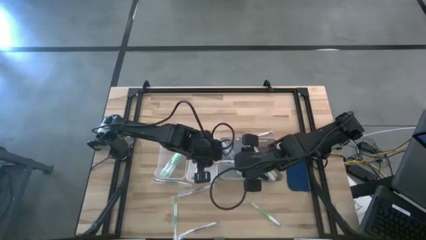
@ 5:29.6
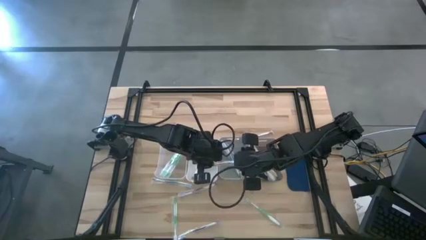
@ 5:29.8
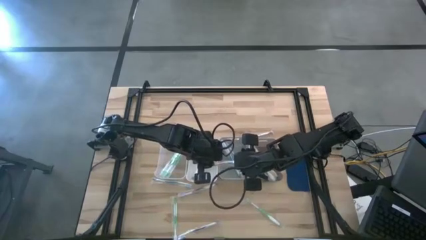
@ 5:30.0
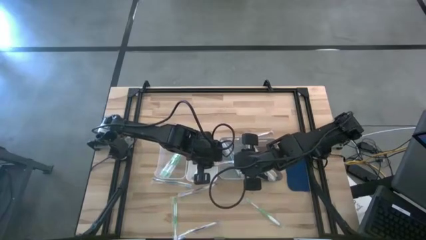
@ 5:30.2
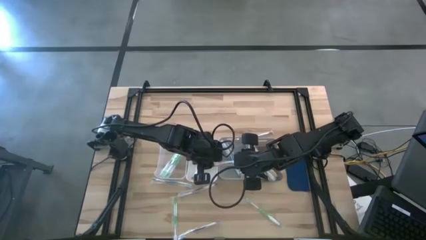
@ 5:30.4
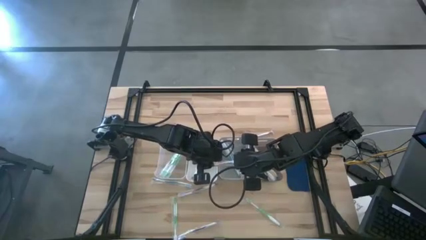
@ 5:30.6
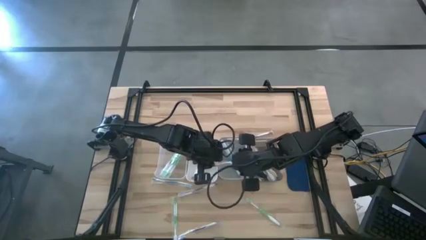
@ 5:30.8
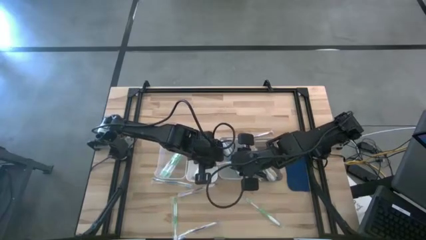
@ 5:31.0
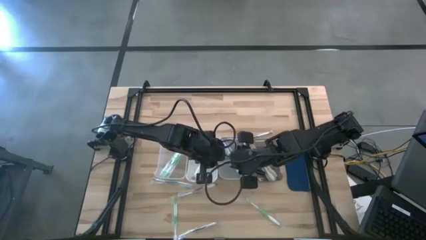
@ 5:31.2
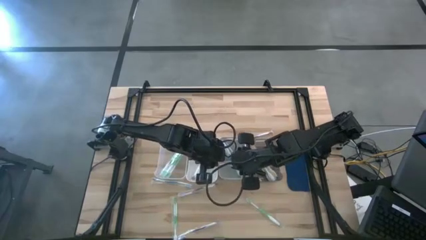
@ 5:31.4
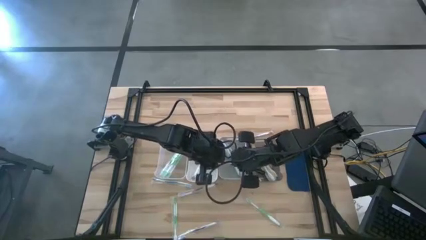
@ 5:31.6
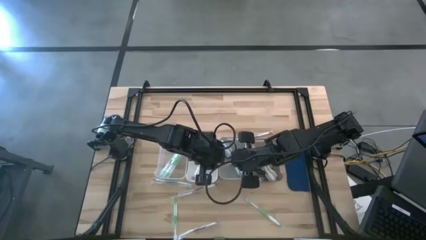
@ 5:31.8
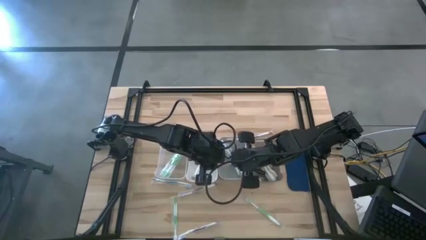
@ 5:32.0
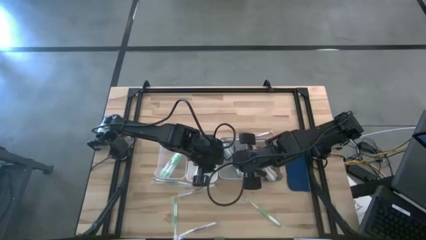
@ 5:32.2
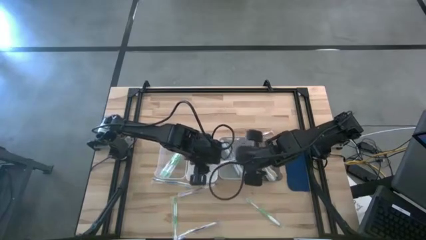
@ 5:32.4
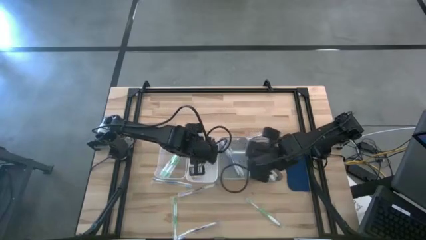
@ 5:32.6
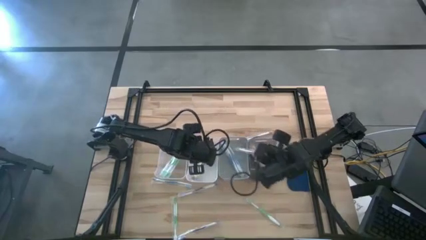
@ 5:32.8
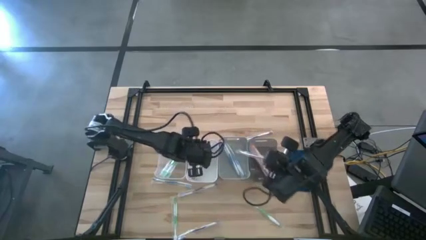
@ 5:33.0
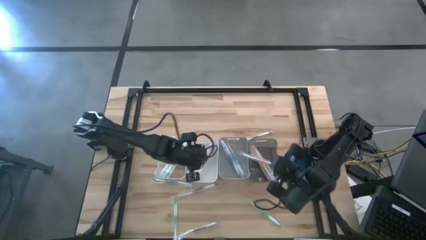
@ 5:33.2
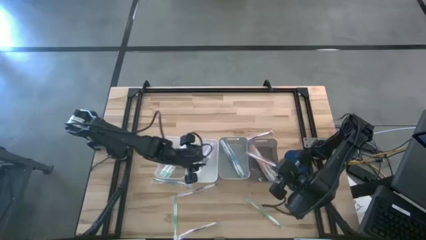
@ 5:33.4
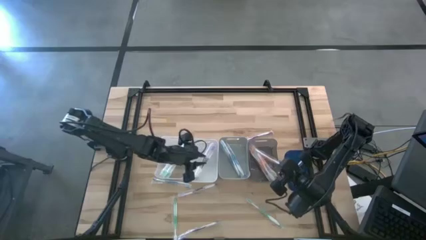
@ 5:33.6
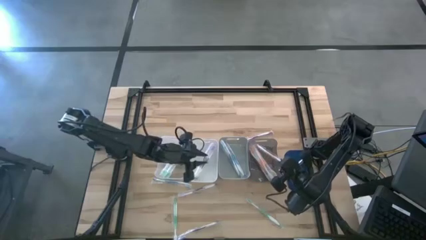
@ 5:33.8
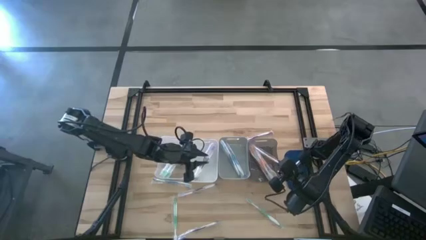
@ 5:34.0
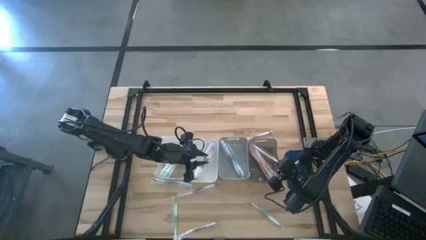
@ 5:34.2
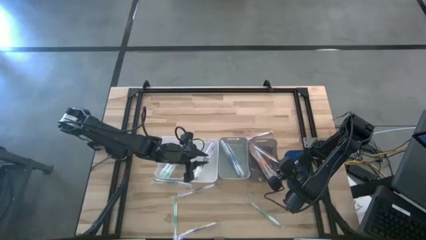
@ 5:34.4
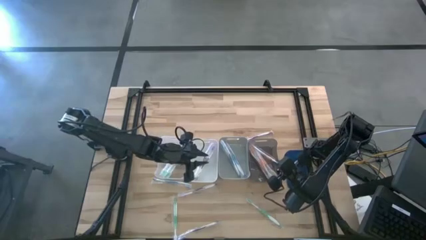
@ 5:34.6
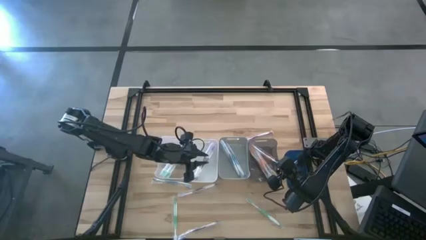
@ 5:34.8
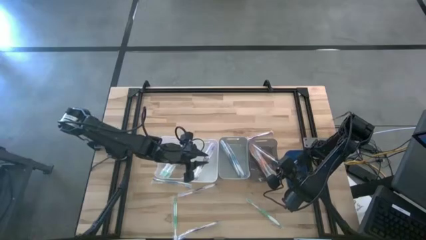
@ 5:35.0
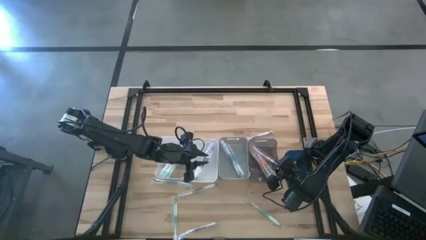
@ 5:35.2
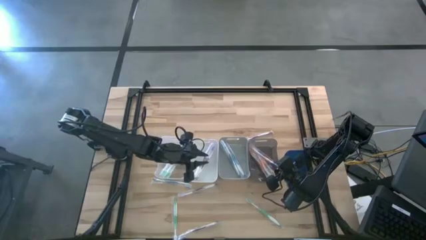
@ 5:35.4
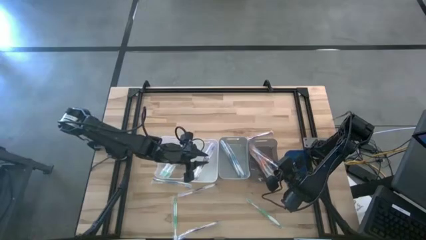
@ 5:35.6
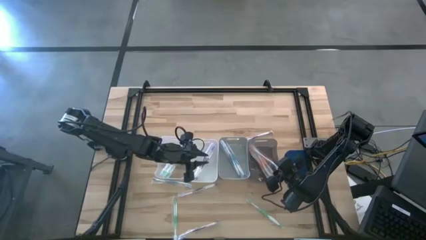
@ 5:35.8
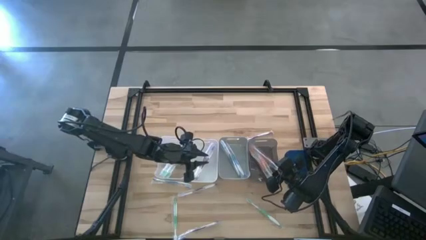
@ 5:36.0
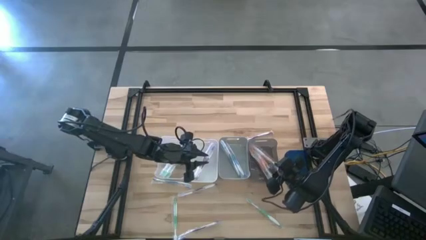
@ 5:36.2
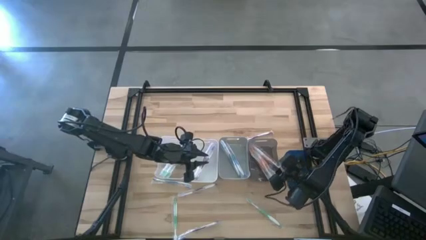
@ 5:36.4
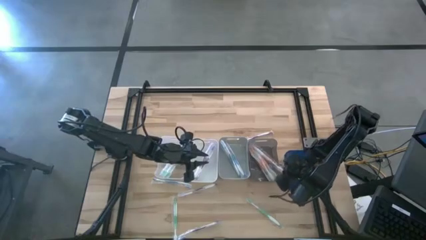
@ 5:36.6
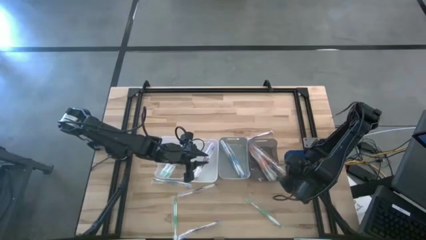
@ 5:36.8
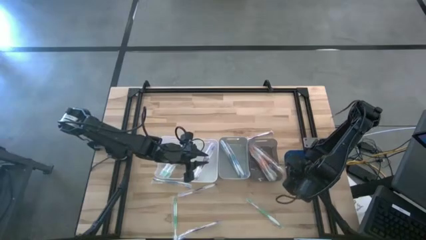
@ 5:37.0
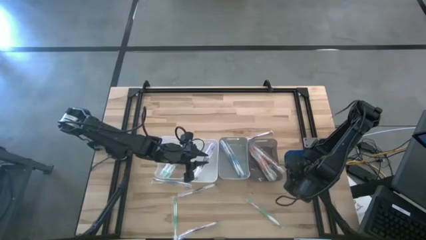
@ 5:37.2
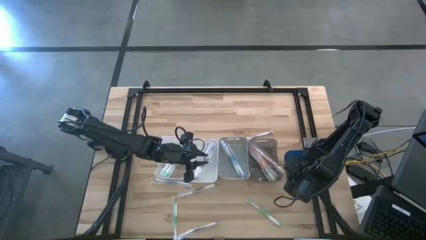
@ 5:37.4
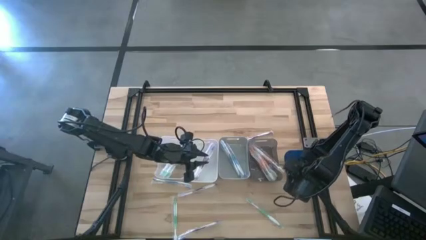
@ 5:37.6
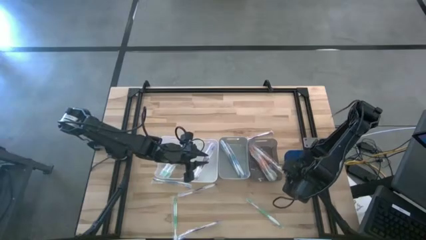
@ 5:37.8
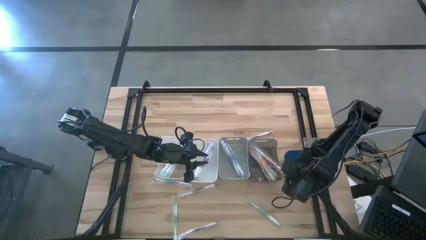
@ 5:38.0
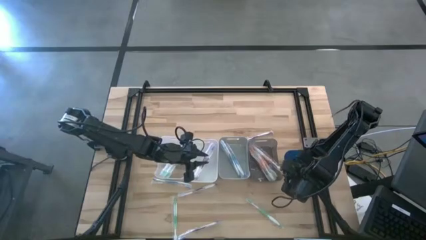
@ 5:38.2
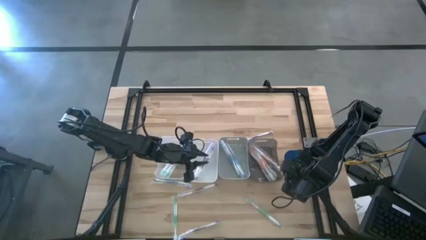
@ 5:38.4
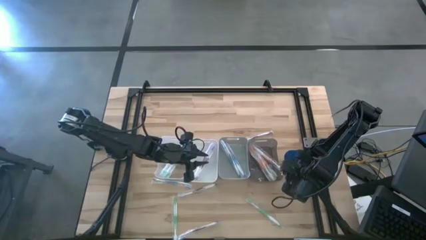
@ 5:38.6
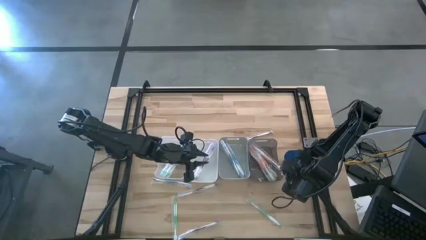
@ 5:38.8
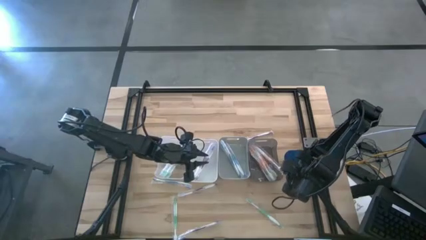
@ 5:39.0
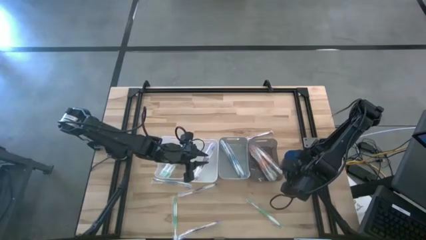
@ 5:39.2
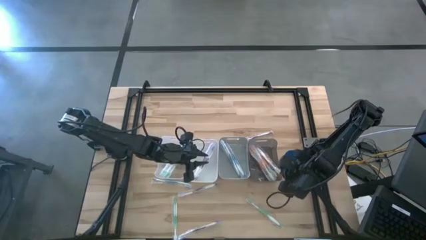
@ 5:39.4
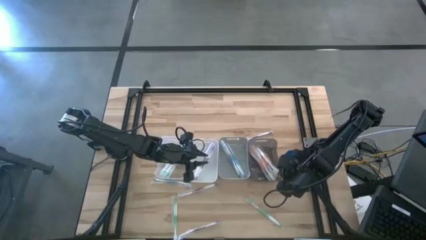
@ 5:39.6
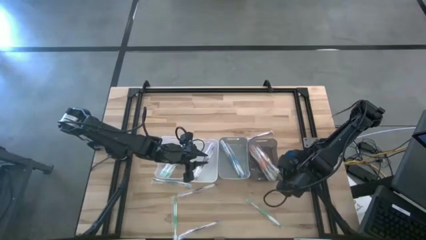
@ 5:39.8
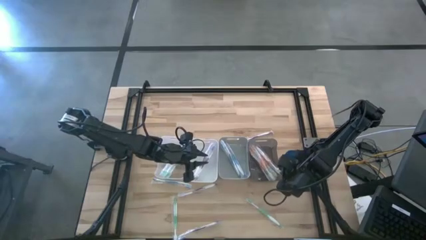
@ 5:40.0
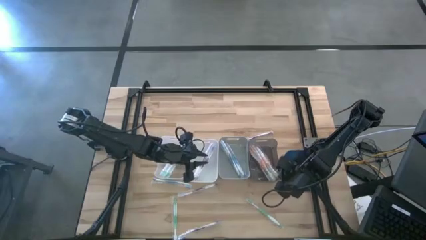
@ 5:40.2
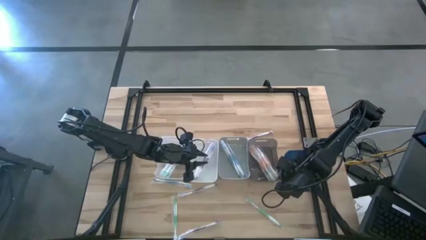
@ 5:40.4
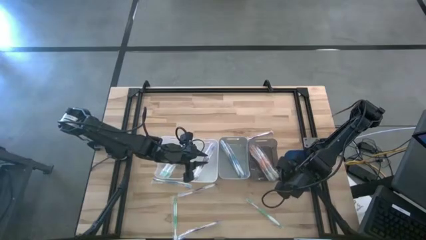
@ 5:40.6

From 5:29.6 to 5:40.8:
Task: Pick & Place Toothbrushes
Put the orange toothbrush into the black bin
